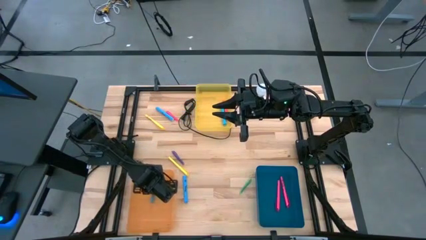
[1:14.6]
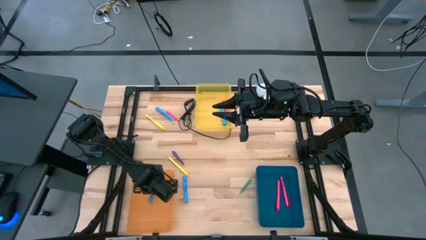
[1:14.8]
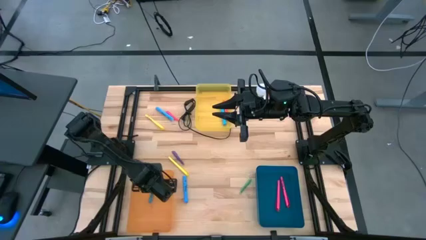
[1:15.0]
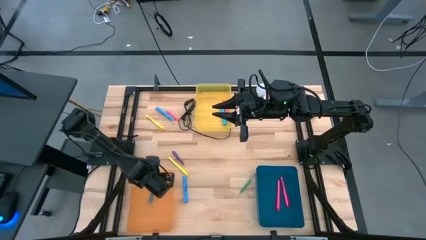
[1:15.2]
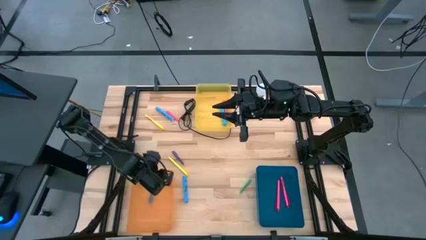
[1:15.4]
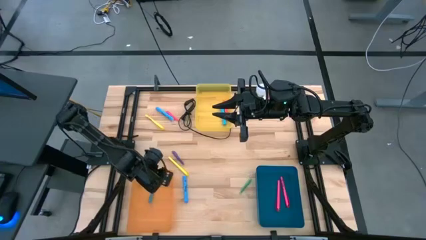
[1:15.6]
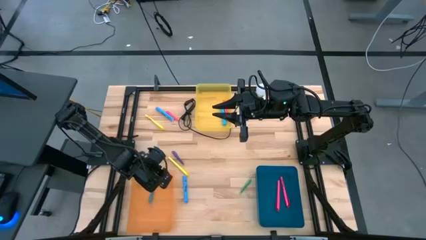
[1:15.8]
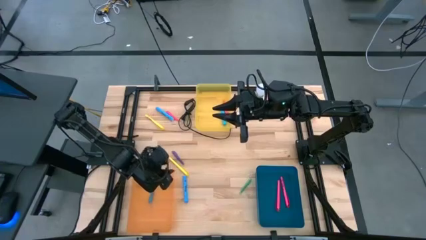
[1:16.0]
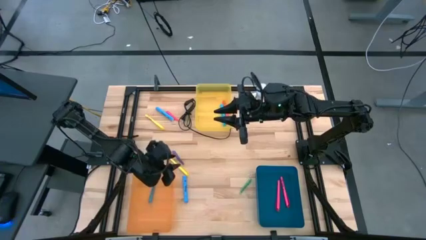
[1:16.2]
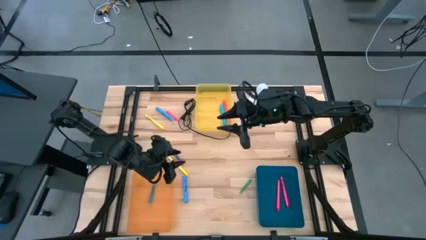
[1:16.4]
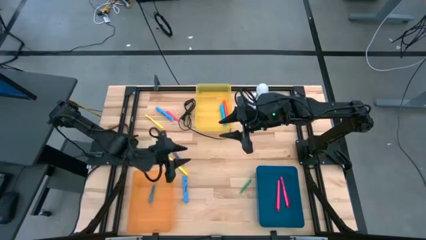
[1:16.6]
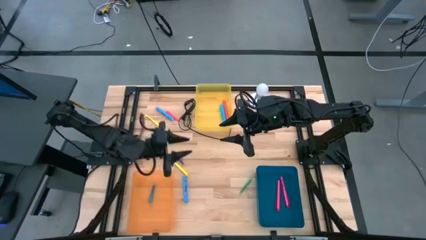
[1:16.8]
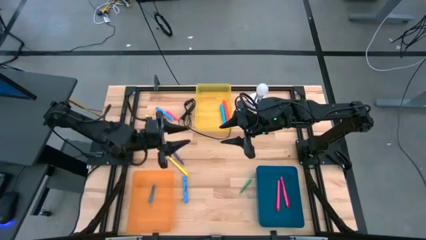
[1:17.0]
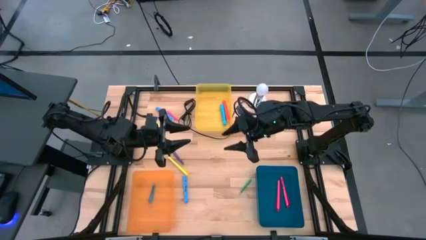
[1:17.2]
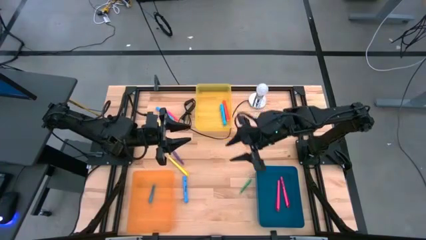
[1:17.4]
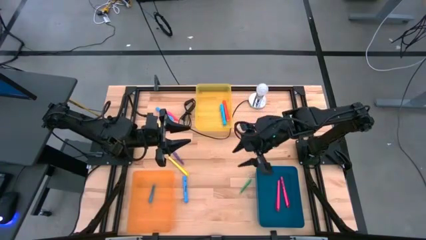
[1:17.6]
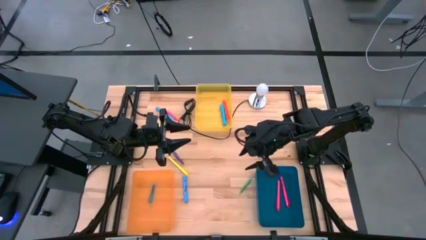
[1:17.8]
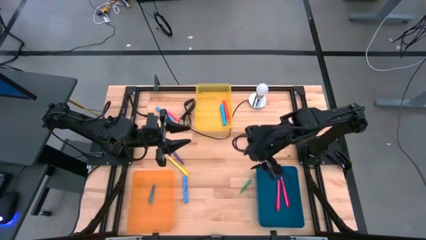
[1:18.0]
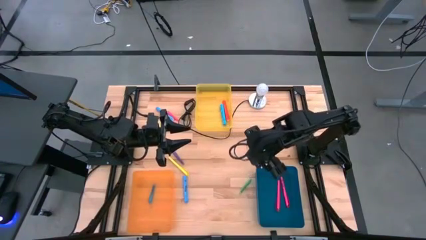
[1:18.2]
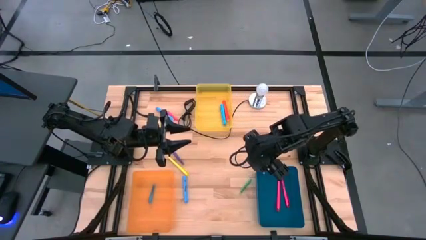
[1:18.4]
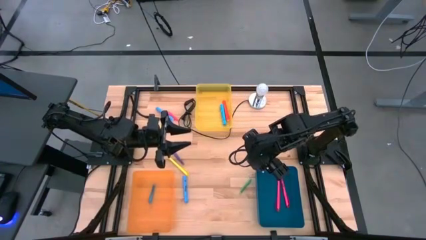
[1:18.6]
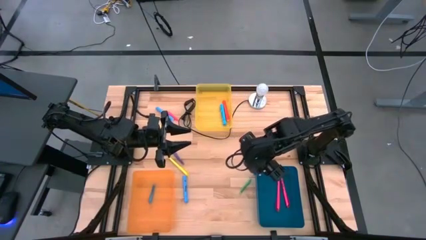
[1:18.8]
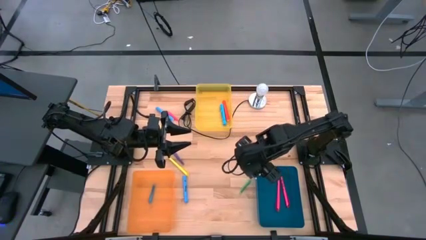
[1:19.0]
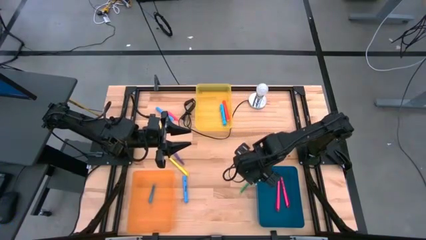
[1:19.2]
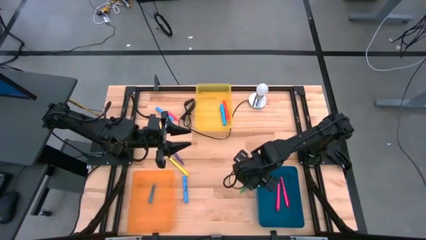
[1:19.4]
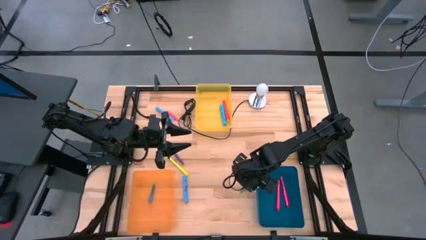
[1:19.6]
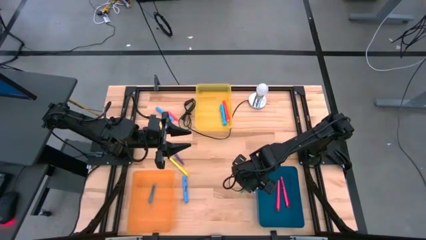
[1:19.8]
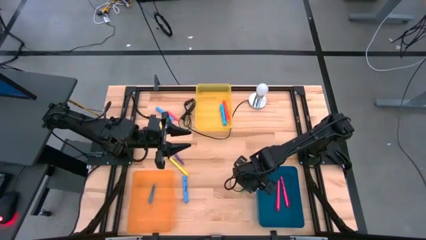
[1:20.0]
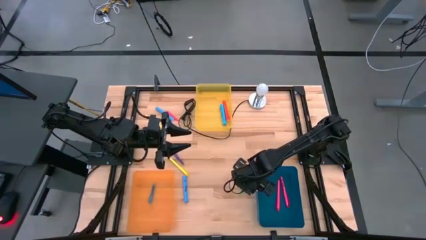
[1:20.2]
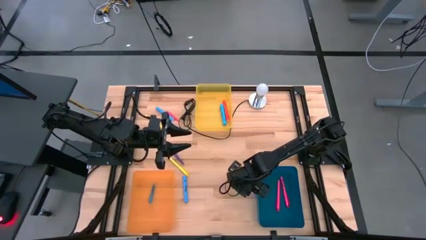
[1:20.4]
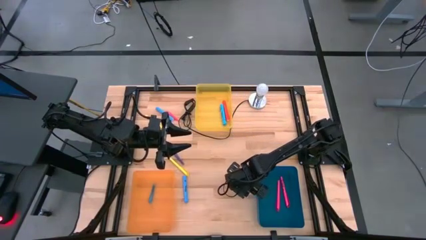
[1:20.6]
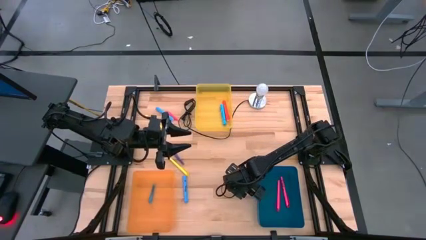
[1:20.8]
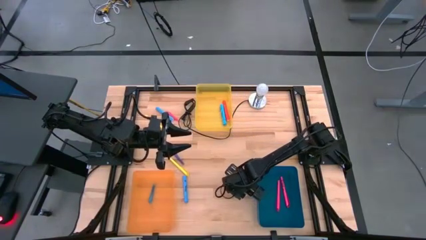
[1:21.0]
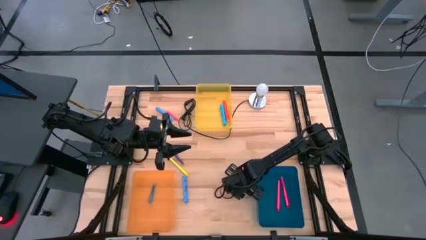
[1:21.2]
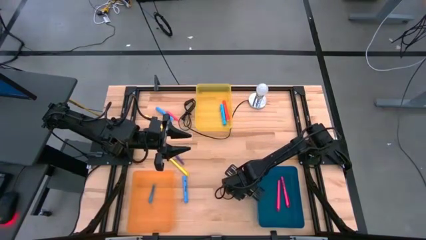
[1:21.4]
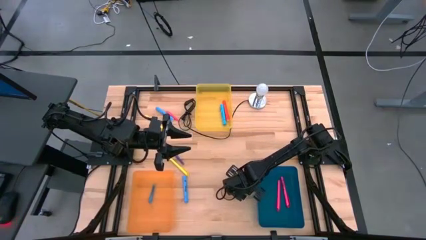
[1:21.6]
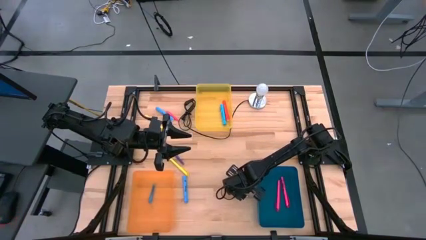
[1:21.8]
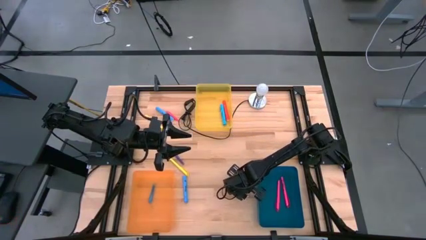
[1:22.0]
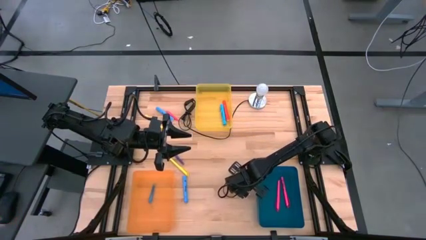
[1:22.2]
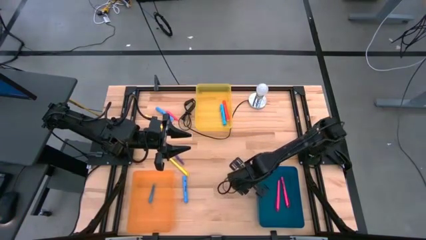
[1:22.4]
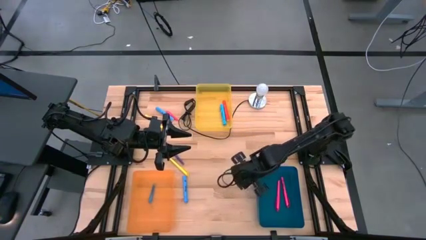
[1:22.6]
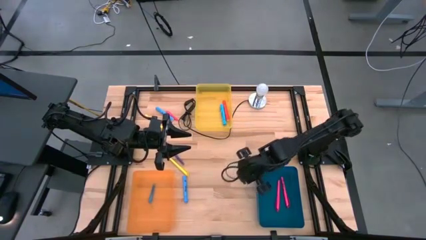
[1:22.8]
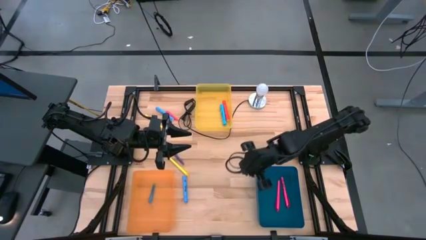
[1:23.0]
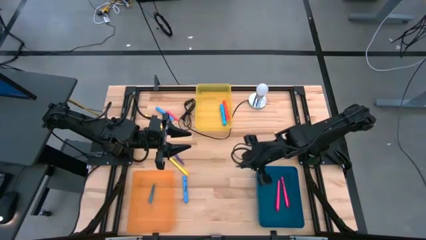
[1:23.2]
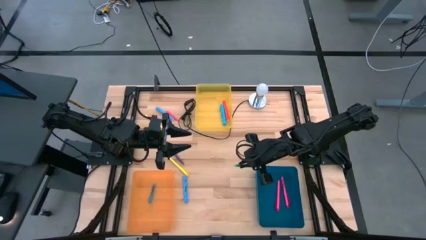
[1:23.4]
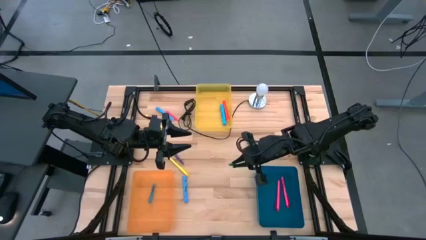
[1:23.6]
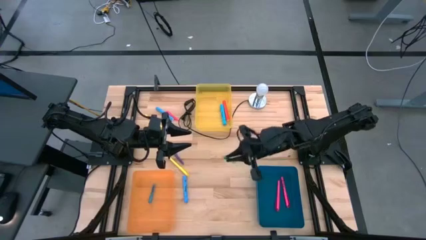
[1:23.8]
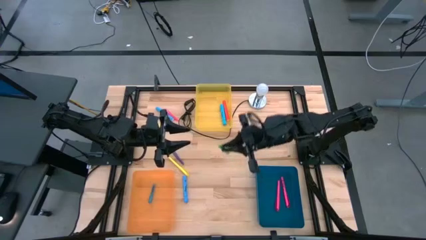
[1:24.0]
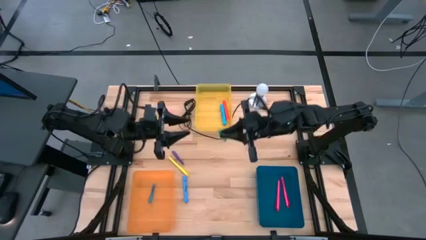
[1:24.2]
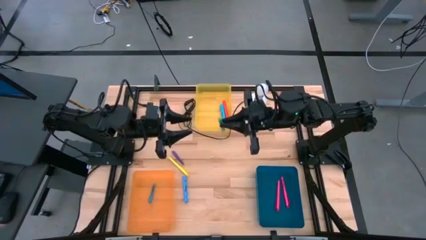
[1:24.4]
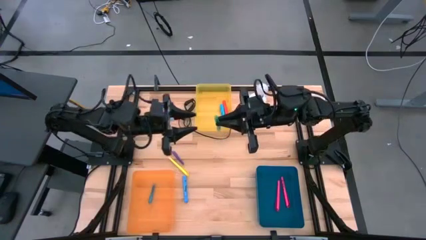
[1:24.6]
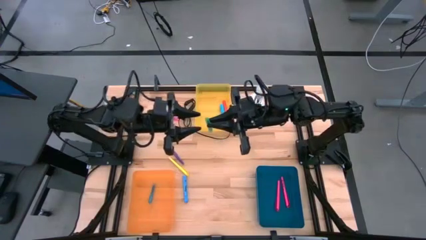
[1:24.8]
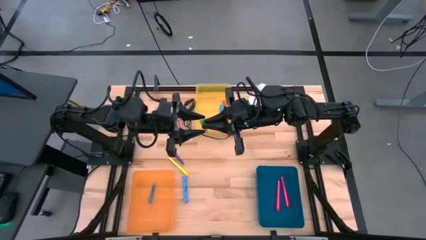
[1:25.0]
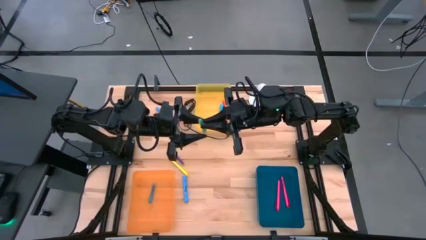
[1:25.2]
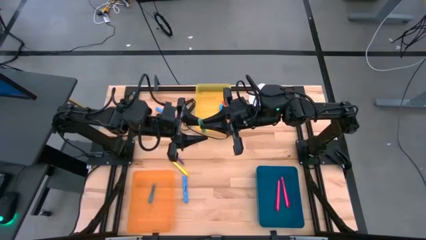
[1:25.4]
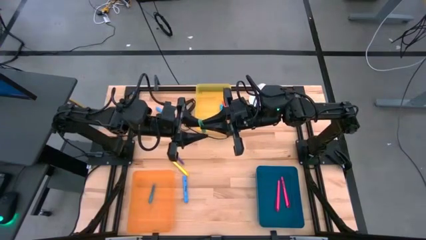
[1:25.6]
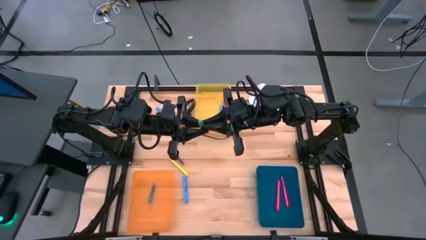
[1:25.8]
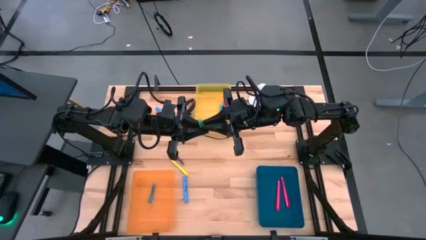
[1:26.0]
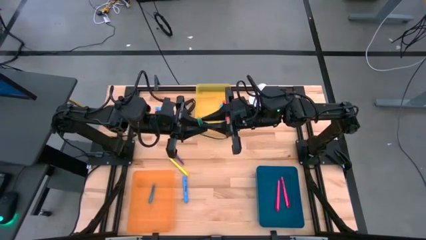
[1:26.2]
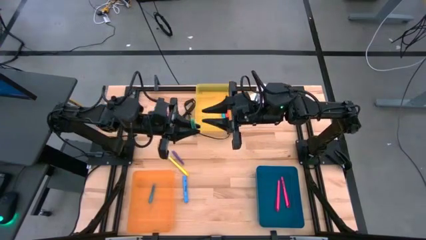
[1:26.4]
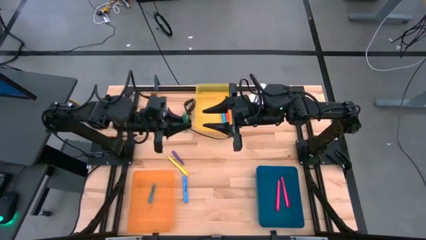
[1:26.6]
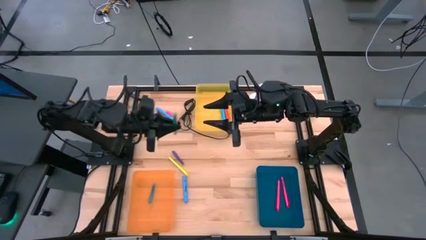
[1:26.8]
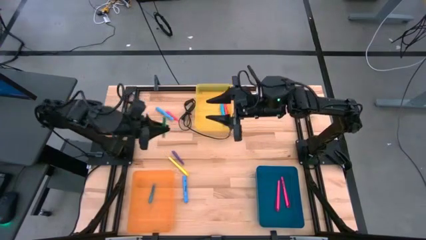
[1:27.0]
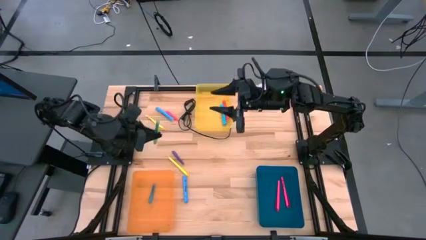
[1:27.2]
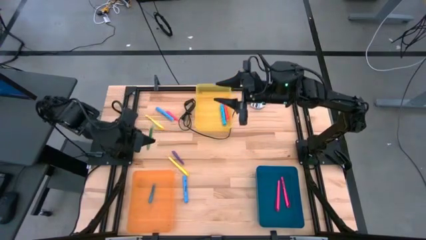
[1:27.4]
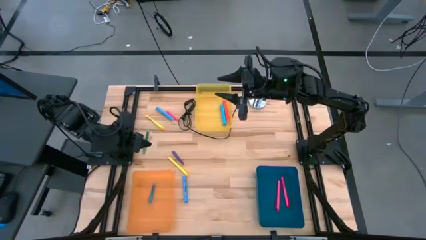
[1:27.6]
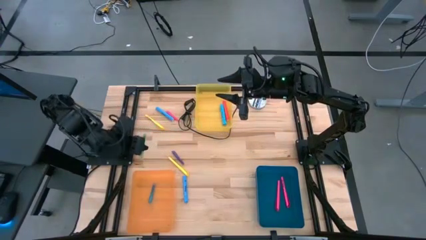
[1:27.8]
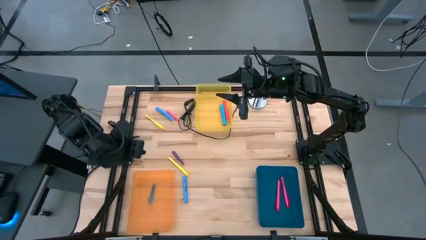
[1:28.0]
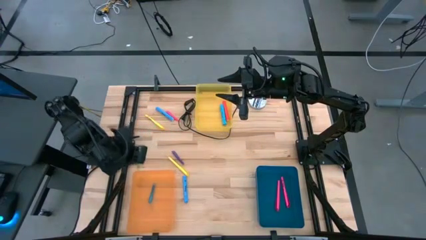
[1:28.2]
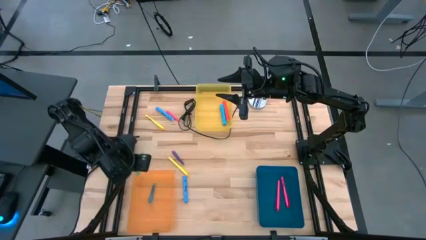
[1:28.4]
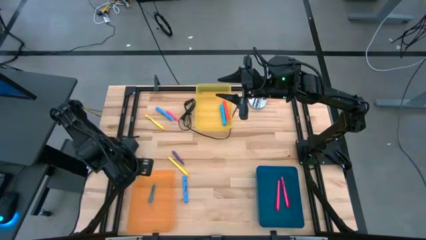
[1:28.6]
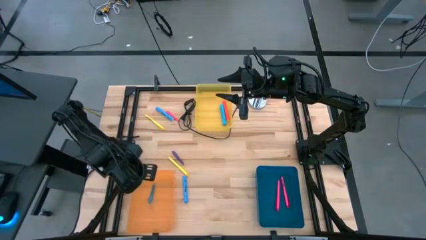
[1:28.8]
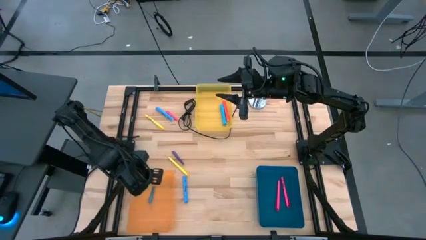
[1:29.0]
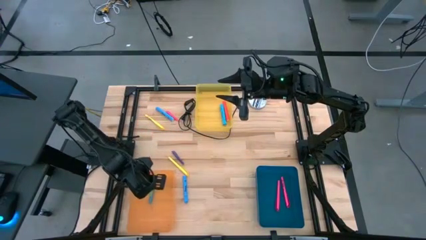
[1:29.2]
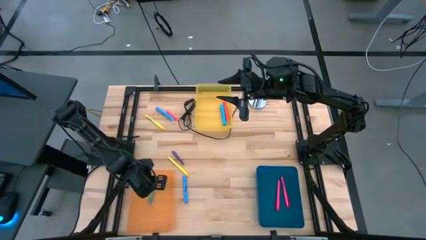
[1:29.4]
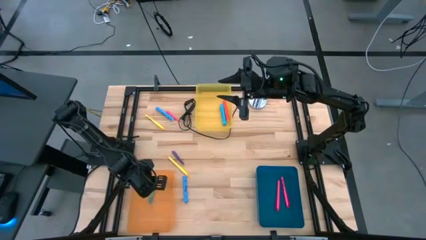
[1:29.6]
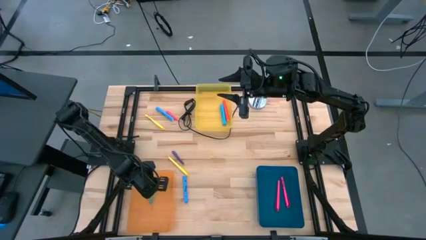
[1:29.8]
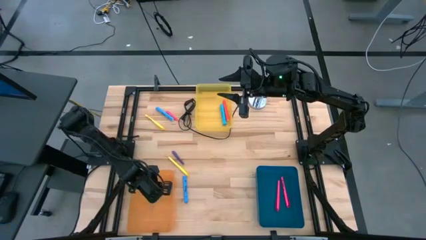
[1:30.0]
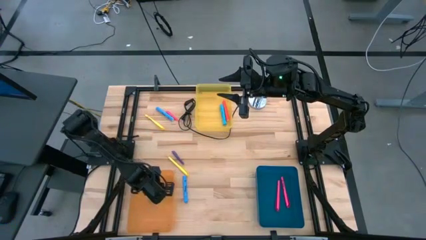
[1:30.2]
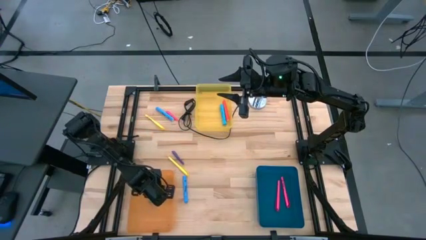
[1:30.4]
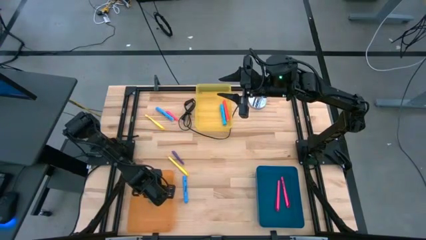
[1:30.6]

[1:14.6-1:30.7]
Task: Pick & Place Markers
Put the green pen into the orange bin
